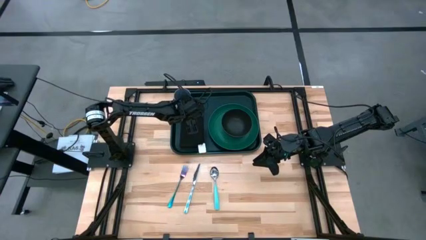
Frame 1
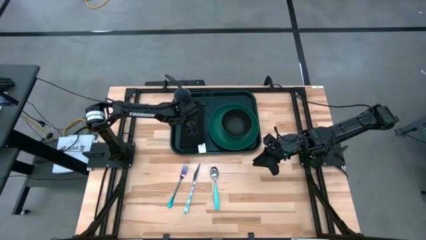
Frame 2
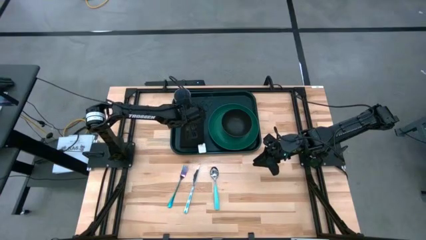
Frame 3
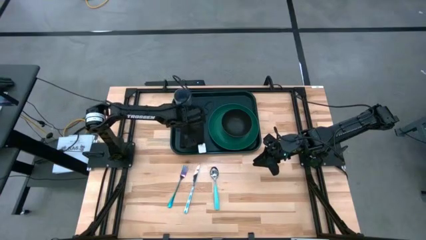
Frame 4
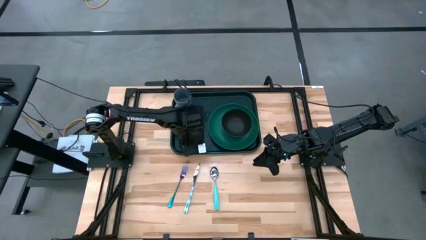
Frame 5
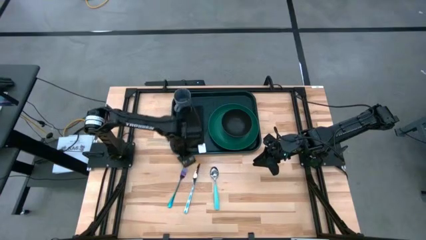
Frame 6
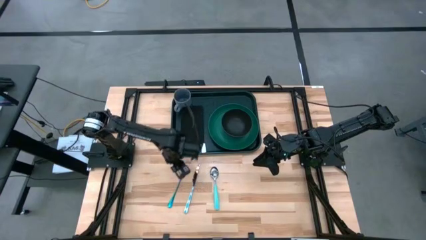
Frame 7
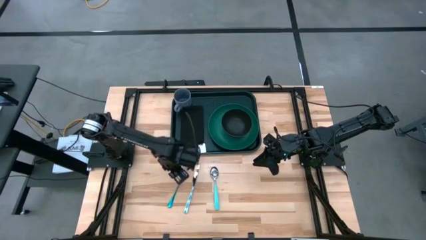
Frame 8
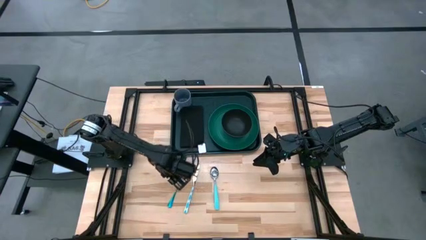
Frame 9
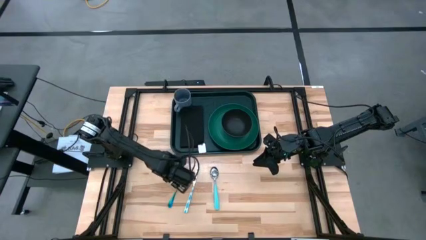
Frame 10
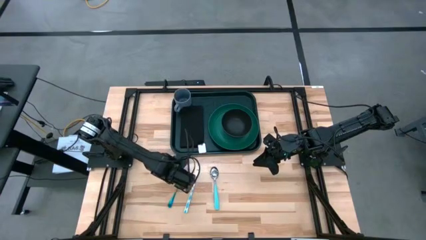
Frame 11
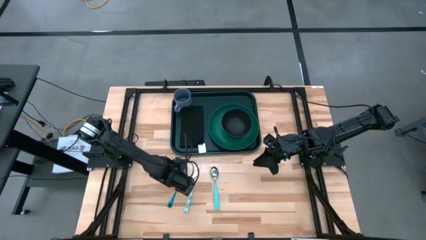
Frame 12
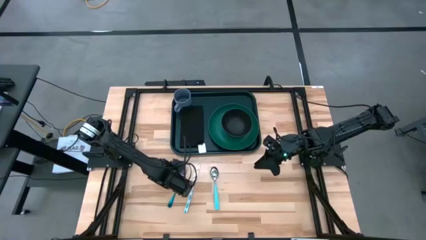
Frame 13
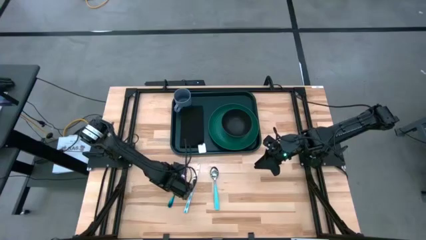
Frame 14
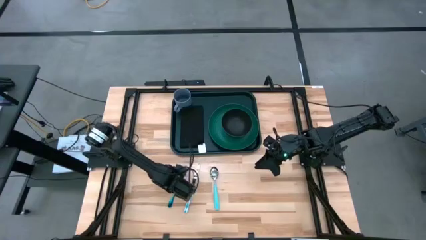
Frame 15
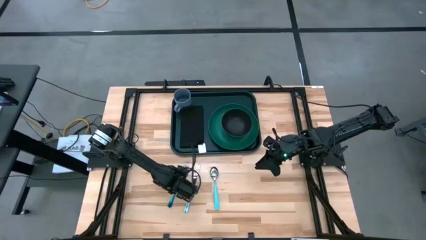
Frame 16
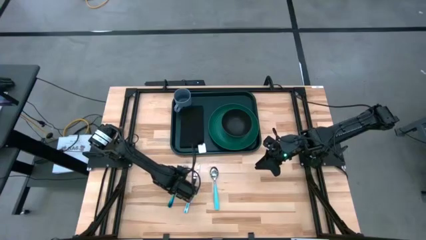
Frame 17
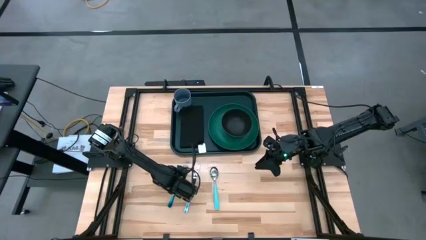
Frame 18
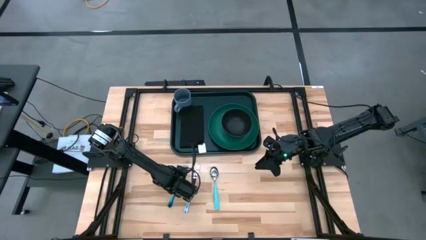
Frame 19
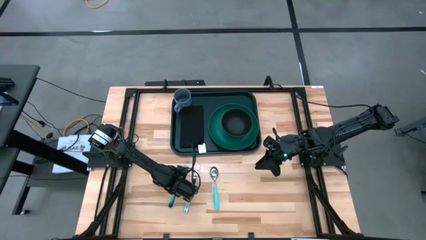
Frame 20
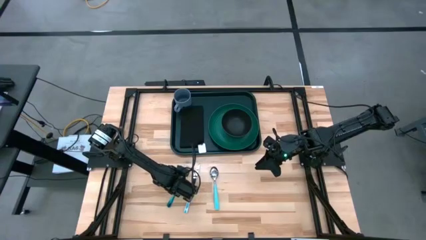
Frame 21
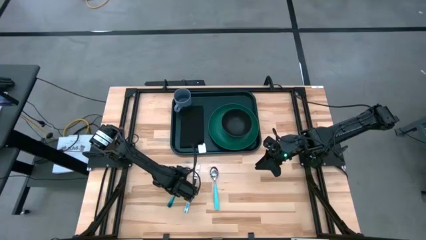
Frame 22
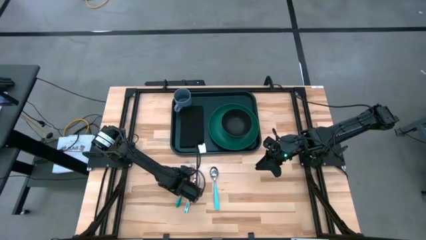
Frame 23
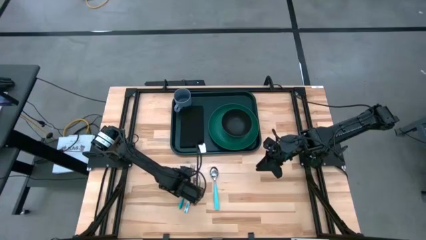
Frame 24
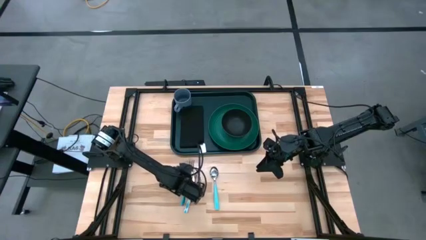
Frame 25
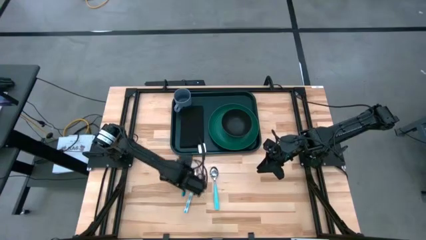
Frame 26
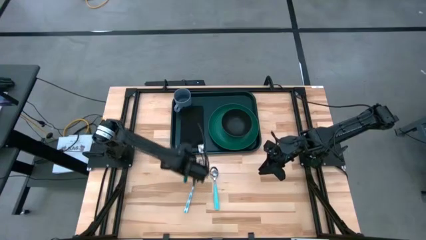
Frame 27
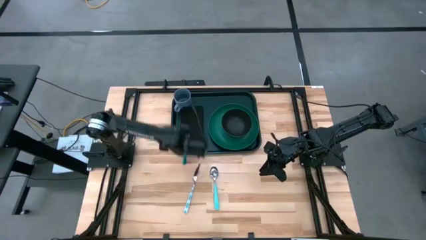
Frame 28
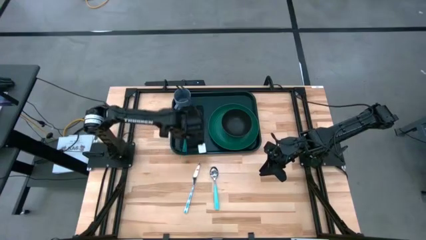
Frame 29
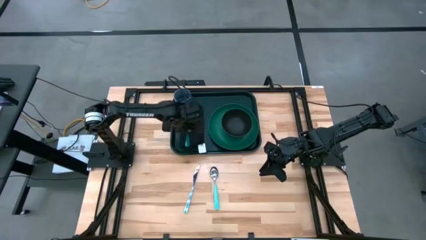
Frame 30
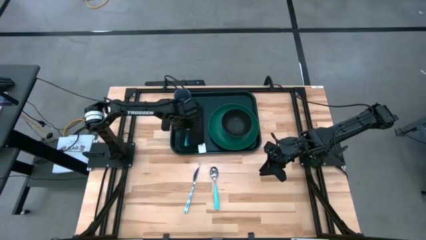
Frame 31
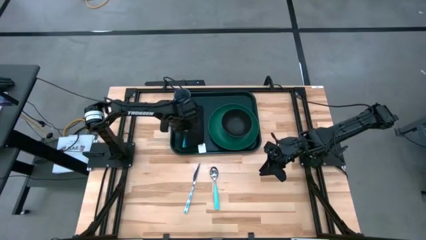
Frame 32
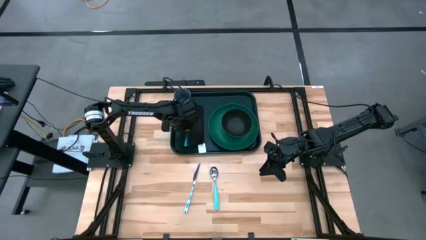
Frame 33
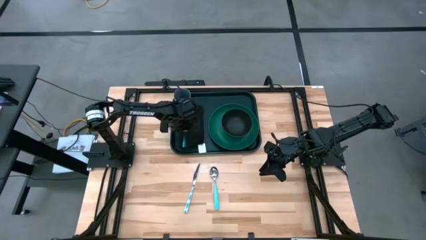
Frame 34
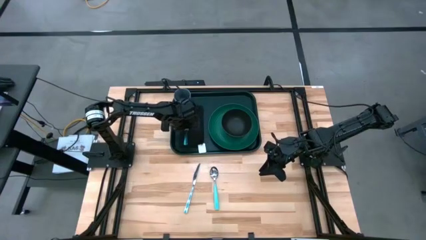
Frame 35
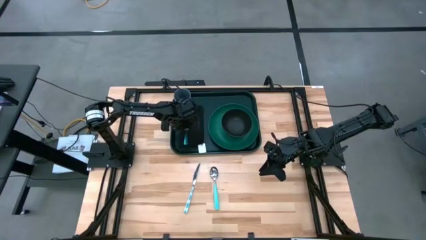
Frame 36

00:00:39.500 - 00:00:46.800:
Task: Set up tray
Put the blue fork on the black napkin

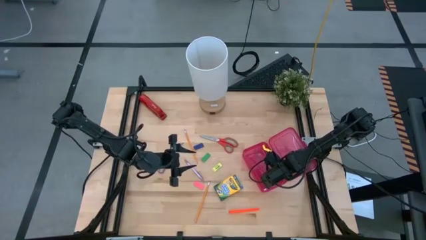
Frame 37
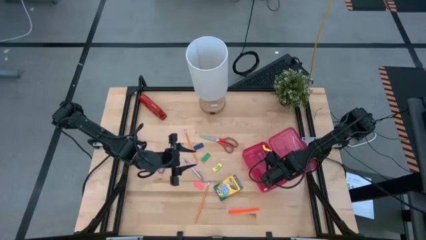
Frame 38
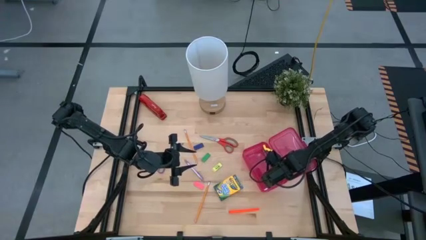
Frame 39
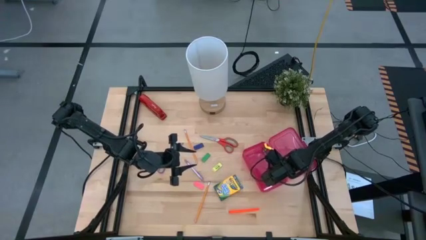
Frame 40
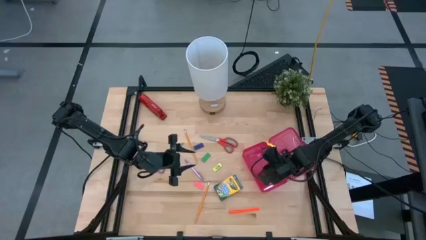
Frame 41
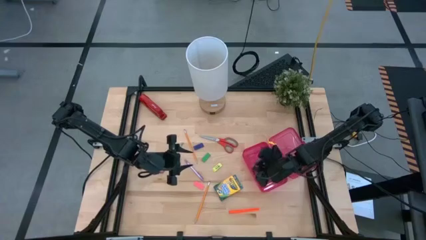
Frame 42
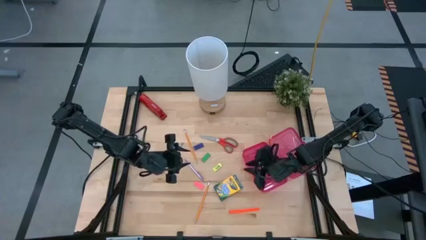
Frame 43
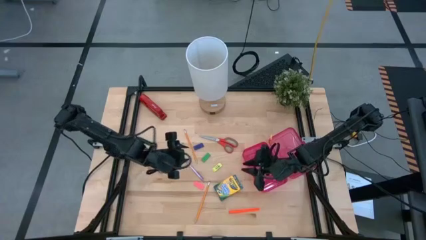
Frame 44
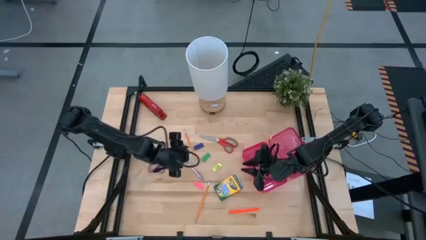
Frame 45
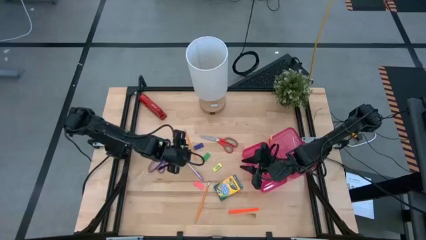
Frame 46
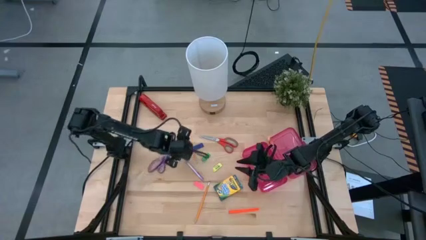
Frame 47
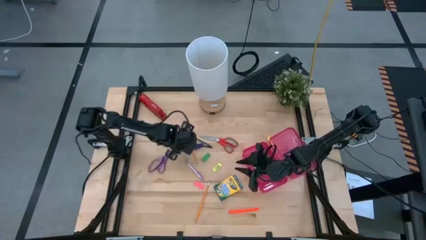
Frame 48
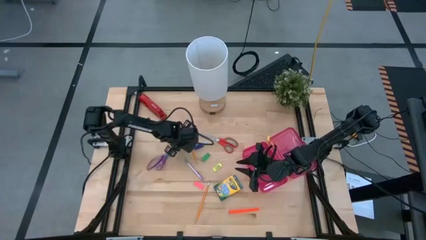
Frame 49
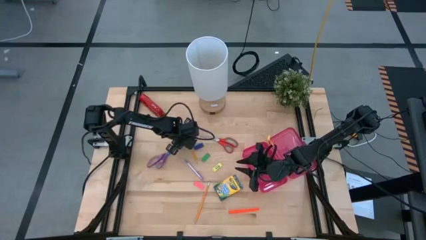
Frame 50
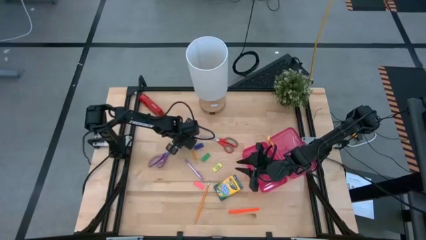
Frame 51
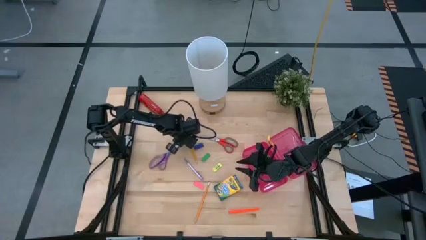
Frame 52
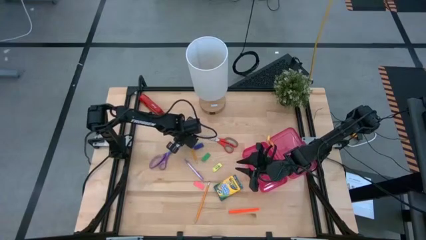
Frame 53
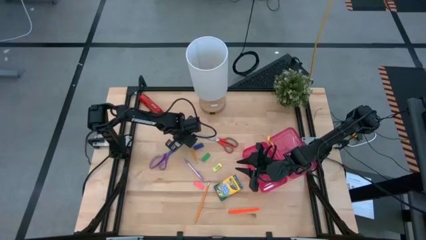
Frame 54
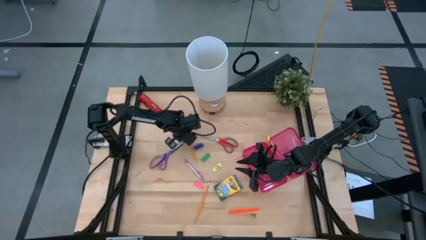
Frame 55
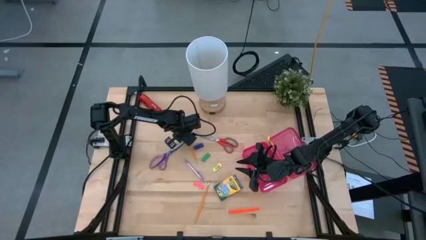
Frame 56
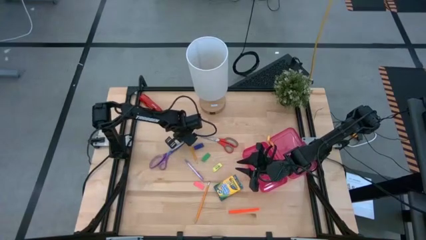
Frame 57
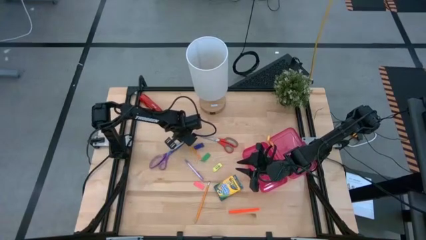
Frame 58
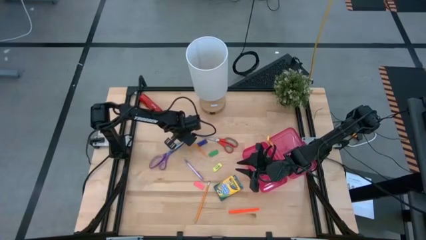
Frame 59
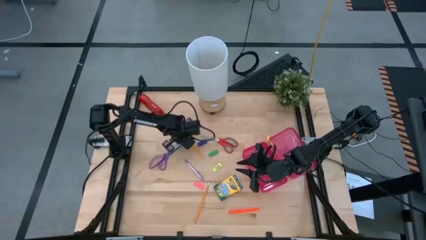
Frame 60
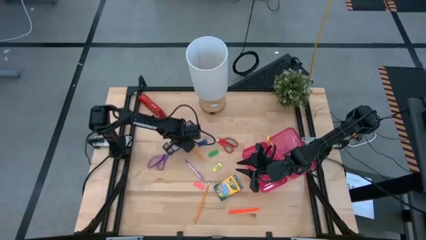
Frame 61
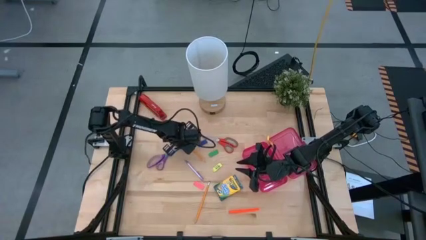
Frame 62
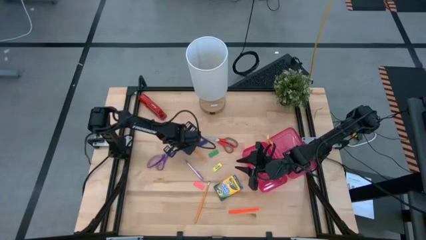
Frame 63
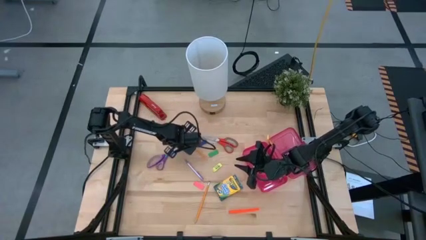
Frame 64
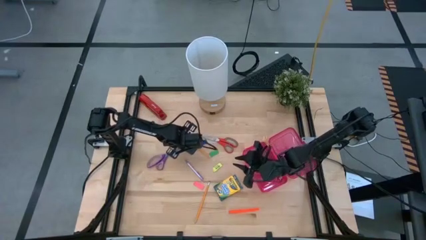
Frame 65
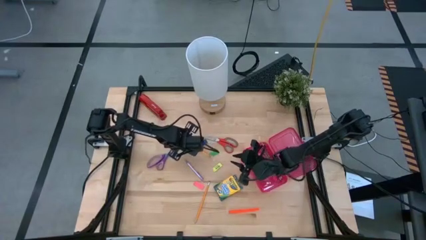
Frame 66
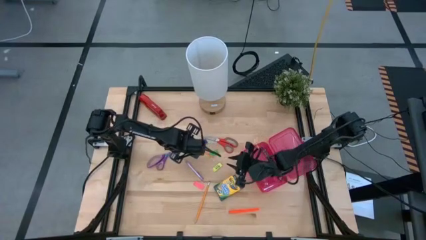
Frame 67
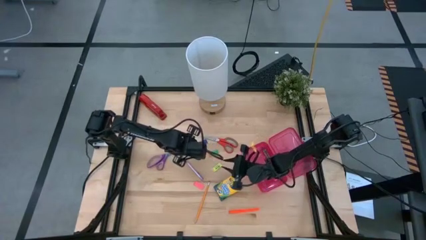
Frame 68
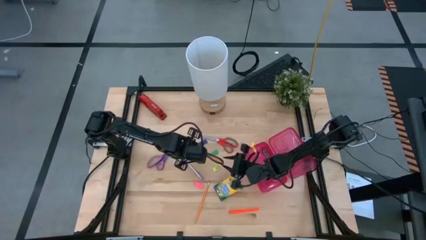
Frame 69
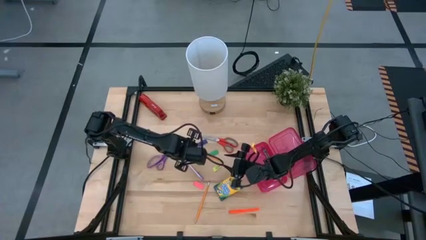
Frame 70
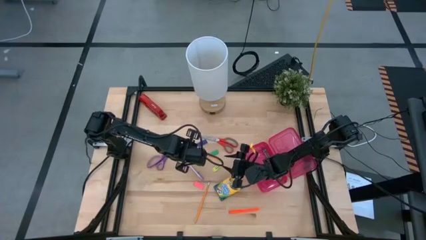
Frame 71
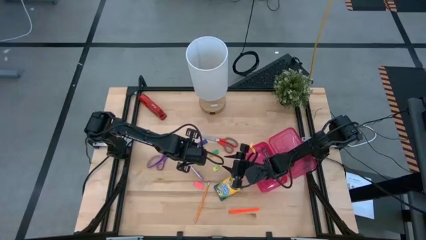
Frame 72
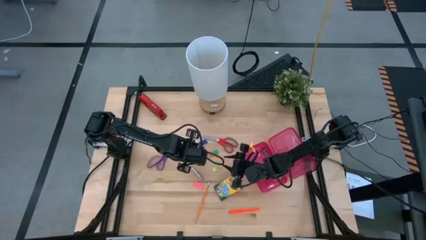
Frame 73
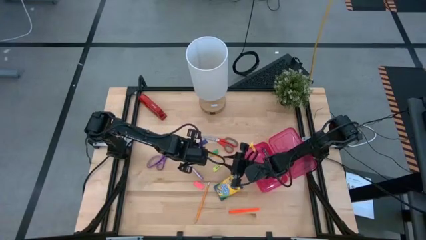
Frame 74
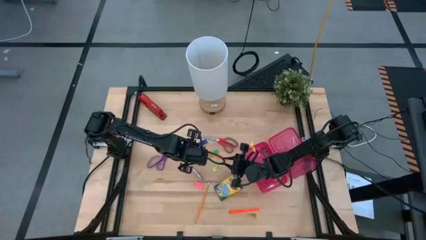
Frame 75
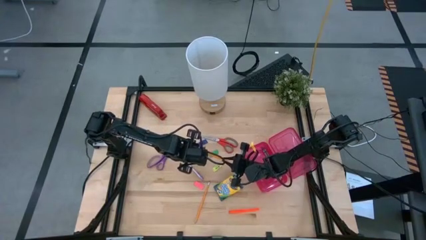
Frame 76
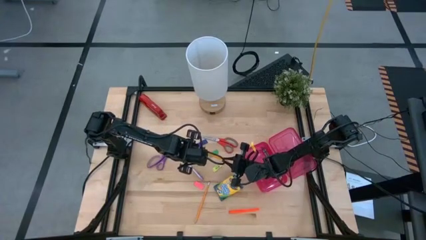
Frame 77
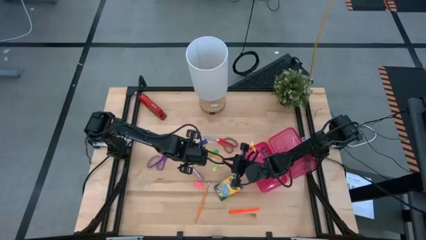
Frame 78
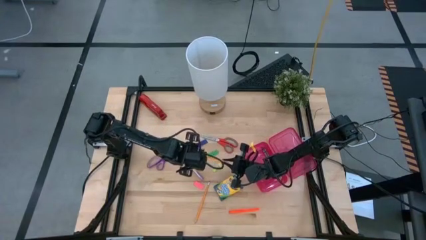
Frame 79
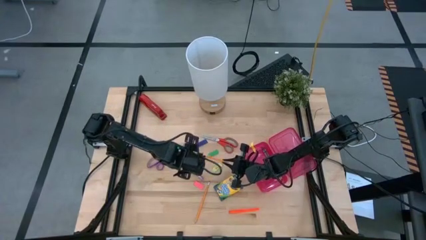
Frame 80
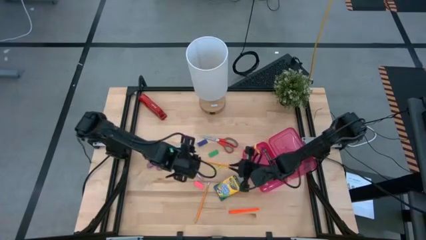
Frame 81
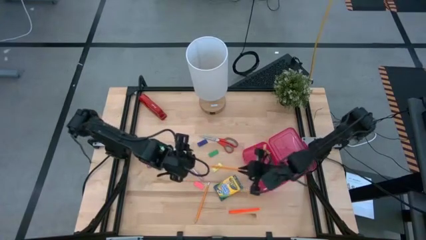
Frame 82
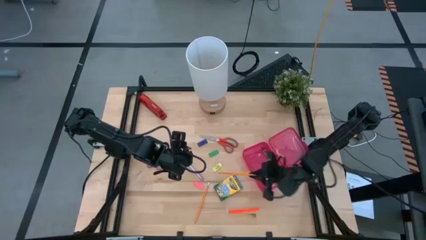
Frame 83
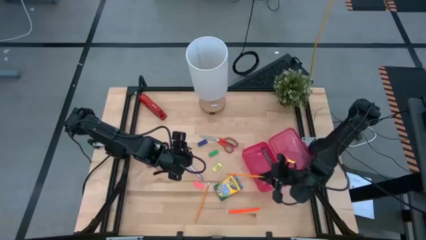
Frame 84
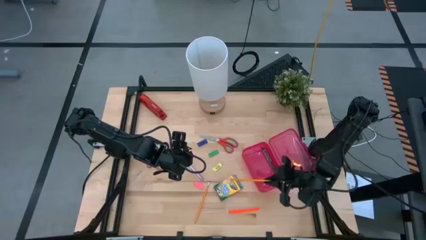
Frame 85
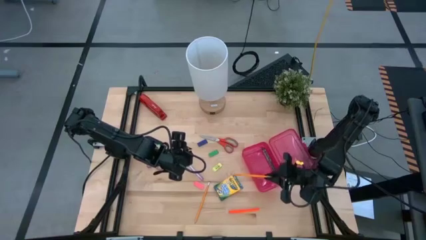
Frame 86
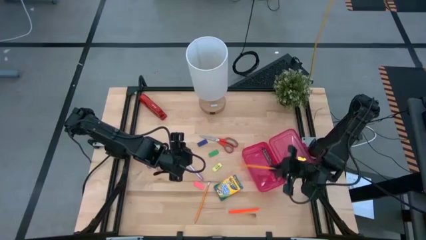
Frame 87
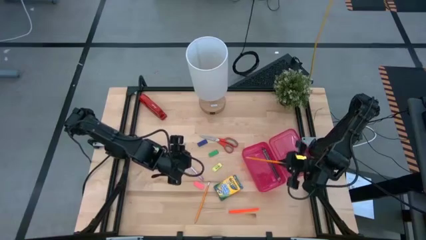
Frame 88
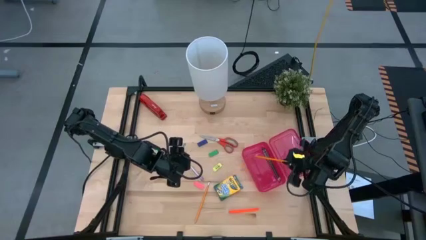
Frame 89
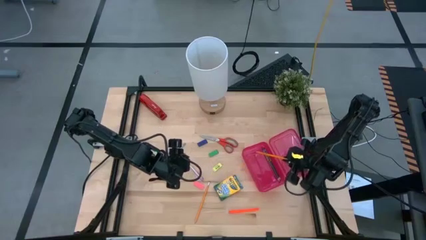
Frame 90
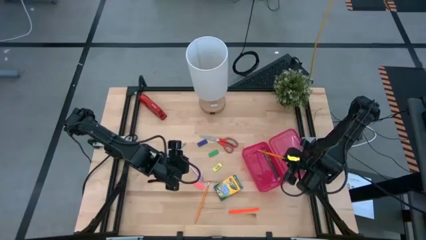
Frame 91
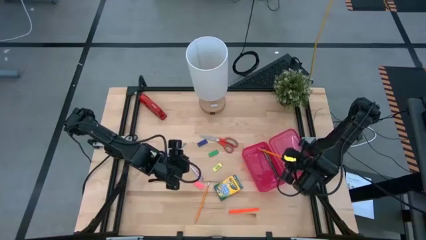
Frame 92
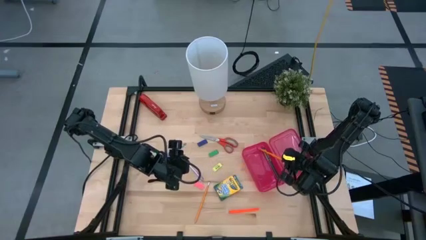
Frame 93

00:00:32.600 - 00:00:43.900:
Task: Pack school essentials
Put the top yellow pencil into the pink supply box
